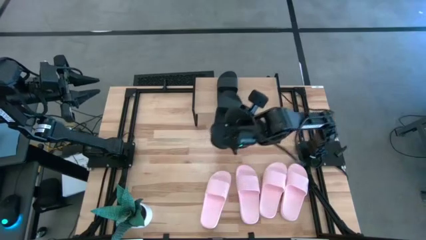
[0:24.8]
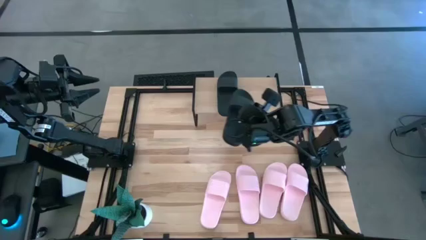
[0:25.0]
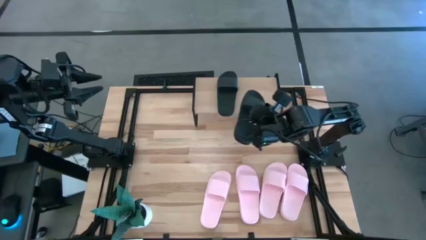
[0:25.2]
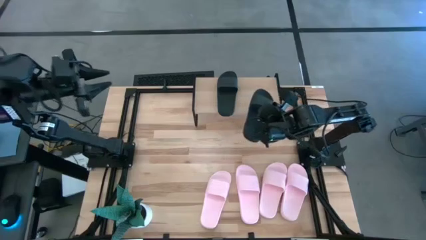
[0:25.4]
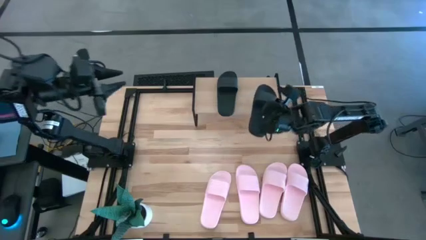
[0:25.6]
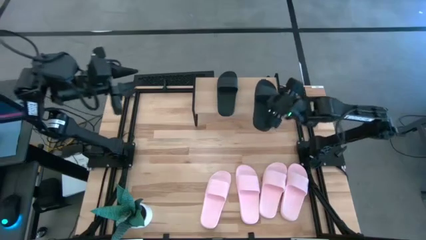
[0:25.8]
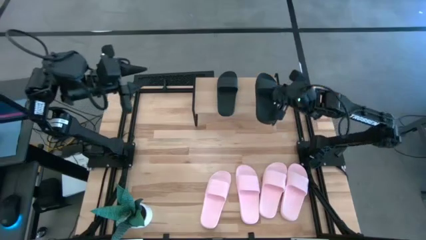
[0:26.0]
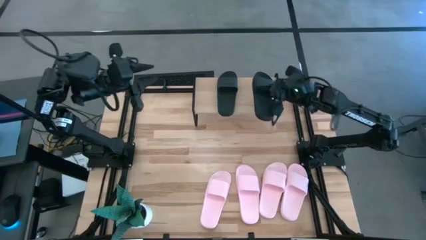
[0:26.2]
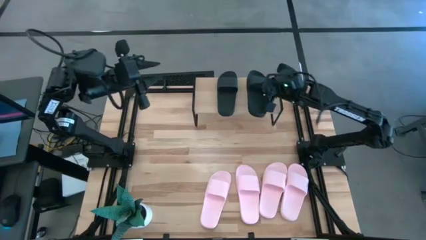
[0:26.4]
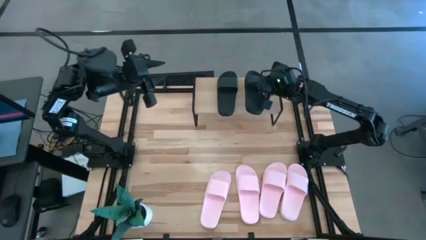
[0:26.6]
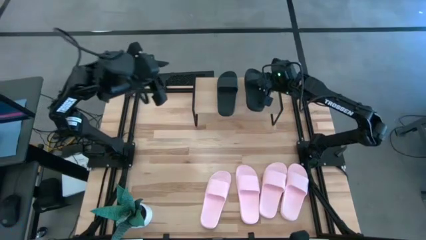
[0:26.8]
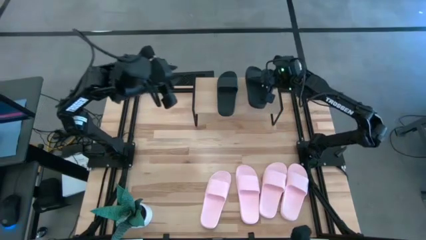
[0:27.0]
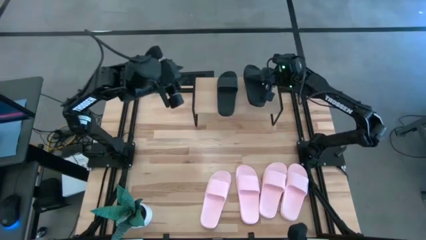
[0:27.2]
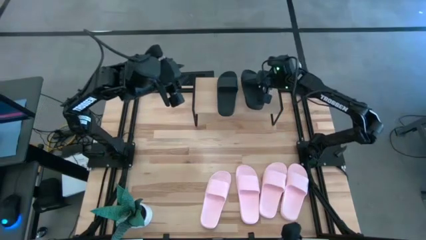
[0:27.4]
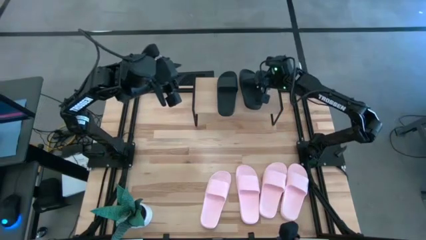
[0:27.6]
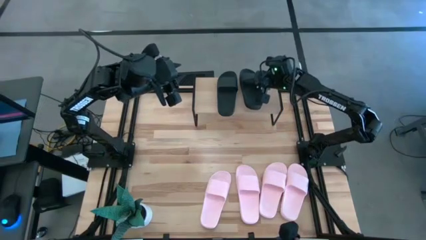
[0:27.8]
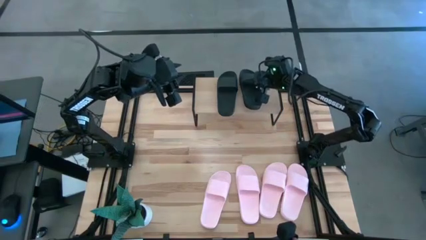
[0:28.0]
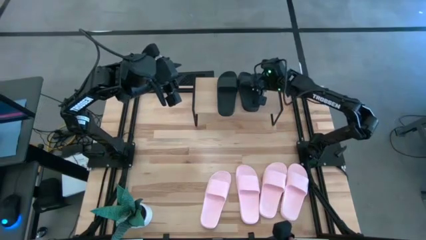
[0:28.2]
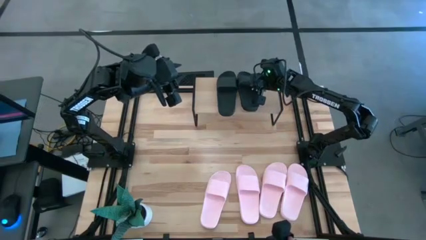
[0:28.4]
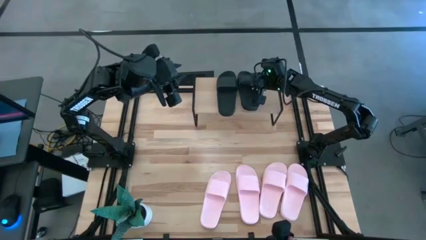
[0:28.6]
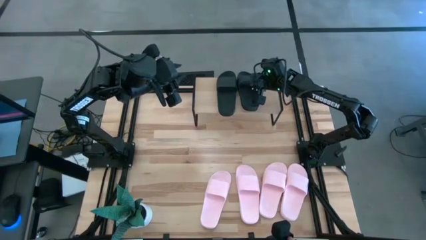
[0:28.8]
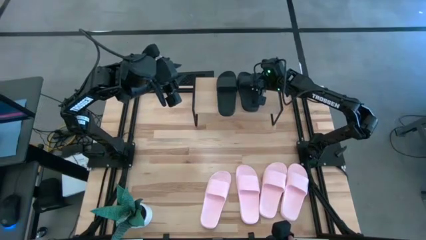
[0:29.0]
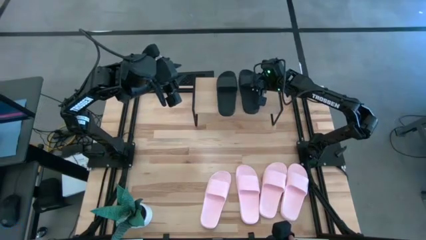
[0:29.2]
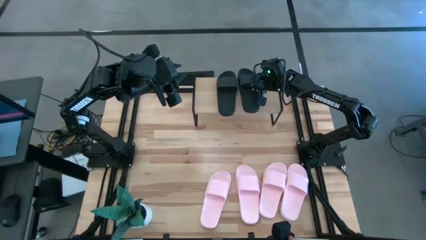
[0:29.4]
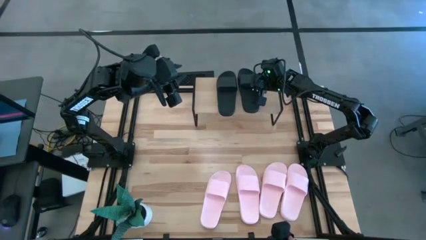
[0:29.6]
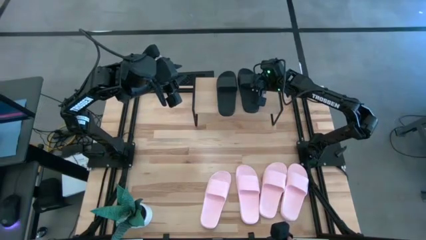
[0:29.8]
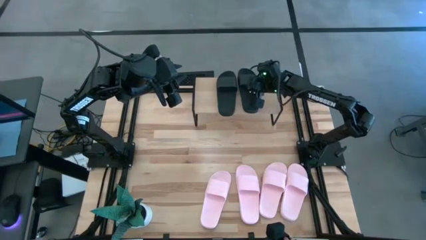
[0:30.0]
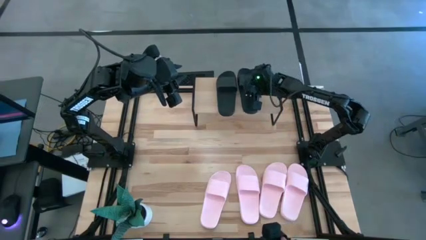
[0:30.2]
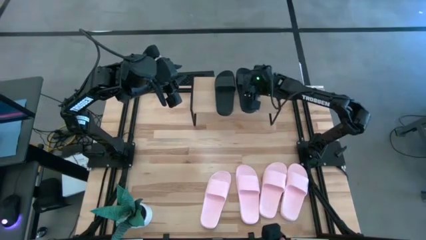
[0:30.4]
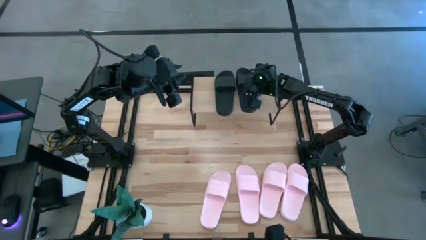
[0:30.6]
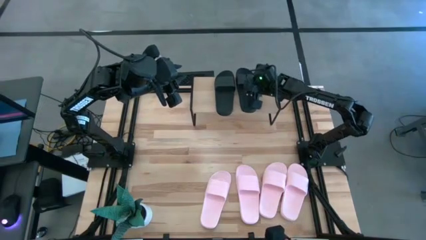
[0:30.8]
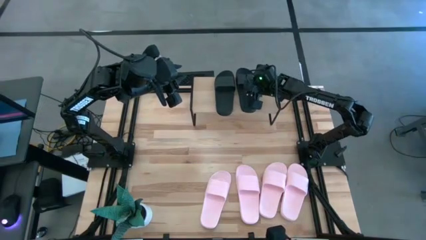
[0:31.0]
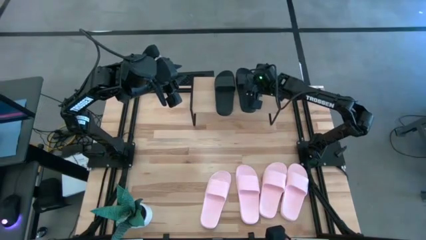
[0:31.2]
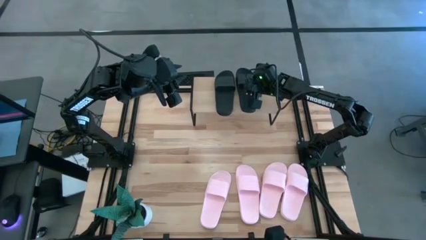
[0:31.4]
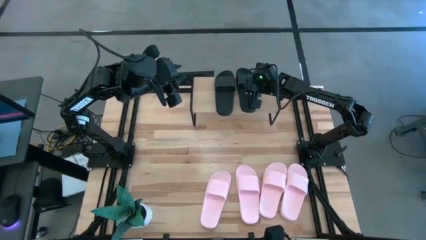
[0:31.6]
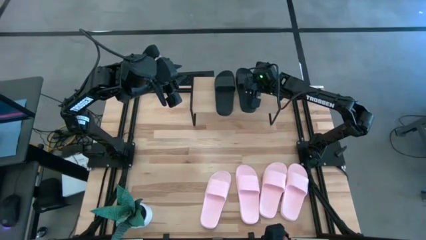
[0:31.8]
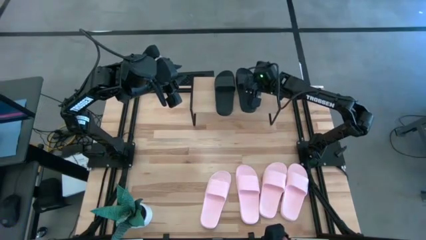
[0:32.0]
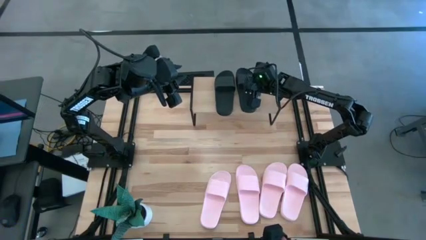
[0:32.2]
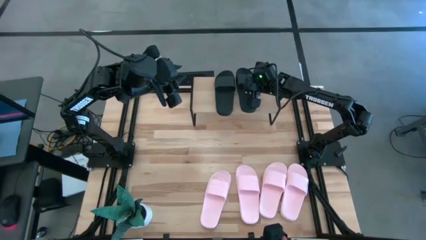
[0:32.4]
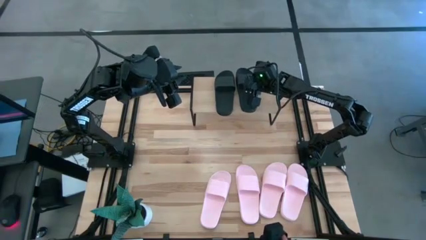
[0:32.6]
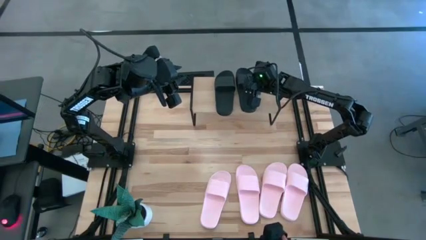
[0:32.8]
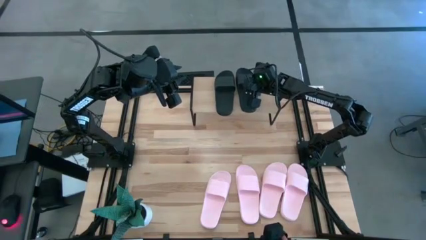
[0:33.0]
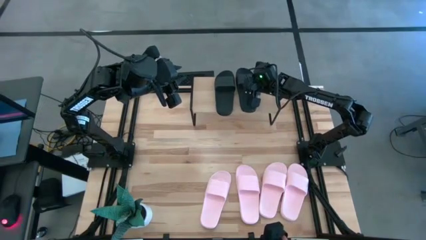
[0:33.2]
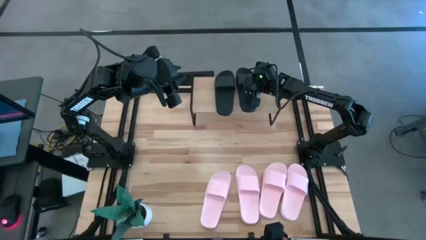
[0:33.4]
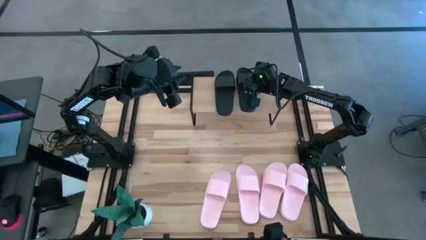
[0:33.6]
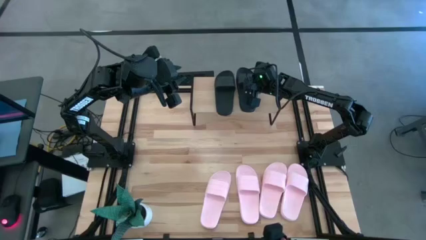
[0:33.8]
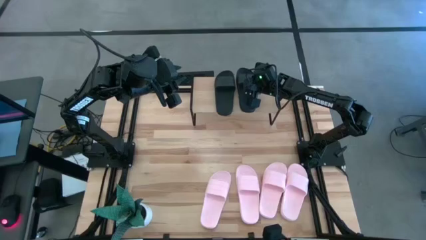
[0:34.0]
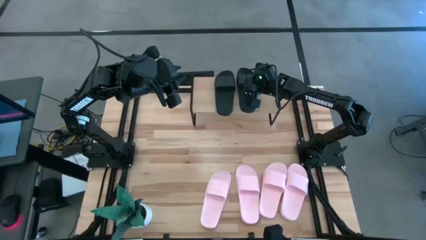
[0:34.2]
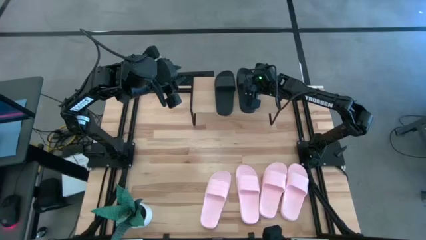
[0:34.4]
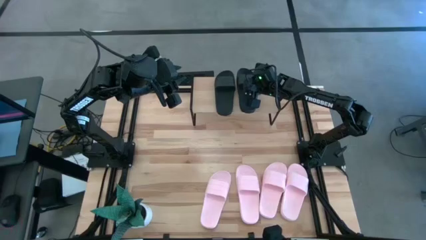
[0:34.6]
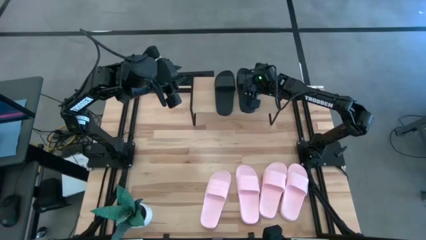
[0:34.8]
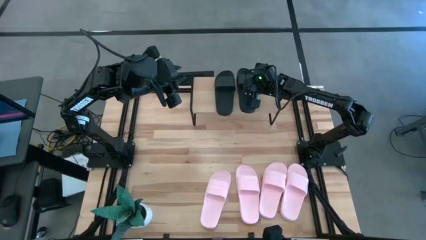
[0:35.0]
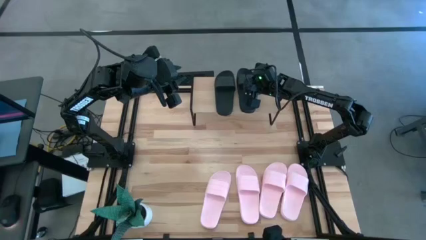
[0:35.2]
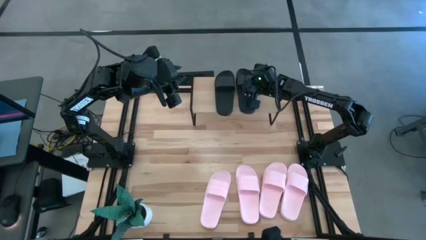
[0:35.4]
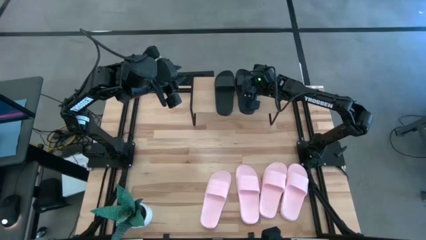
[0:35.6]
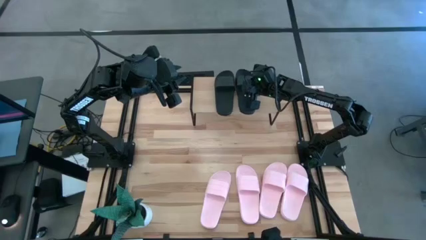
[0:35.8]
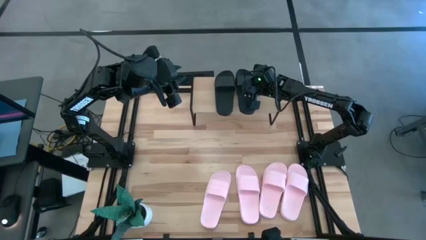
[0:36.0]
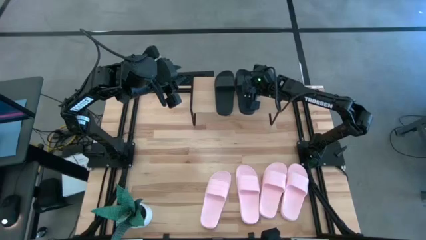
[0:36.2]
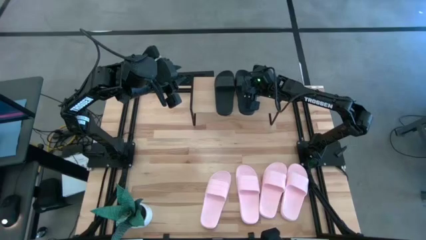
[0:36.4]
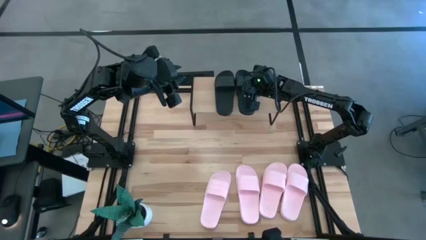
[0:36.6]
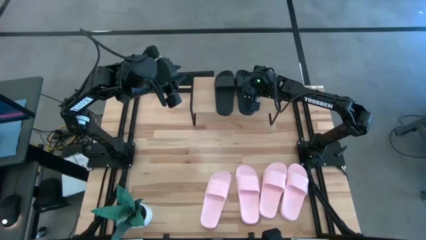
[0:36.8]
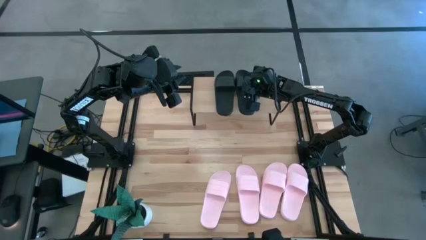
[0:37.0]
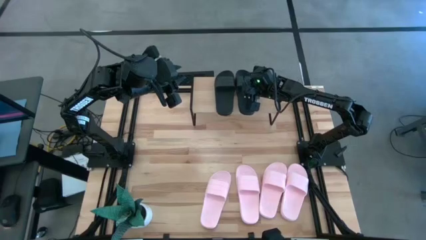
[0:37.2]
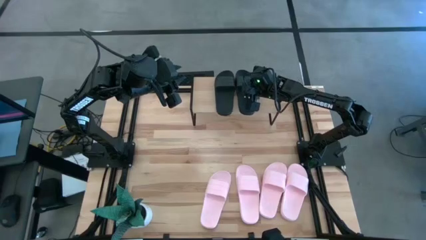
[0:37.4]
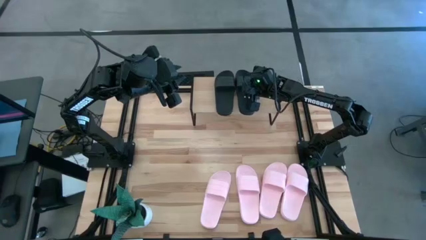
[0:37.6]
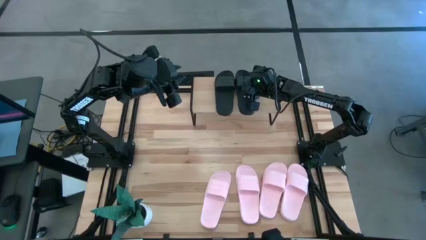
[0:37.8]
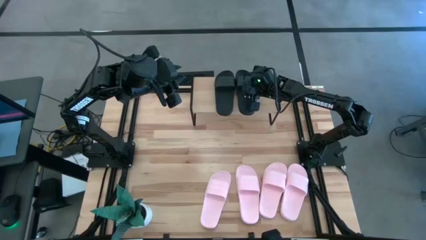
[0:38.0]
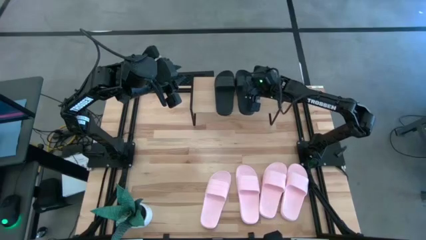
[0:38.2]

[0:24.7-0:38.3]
Task: Pick and place slides into the shelf
Put the black slipper on the shelf

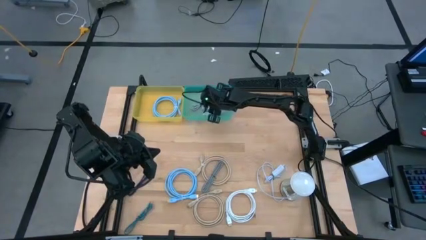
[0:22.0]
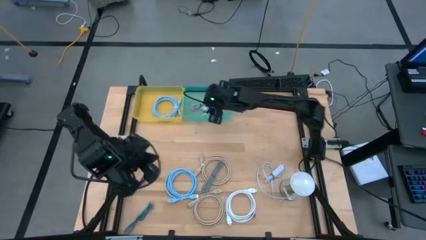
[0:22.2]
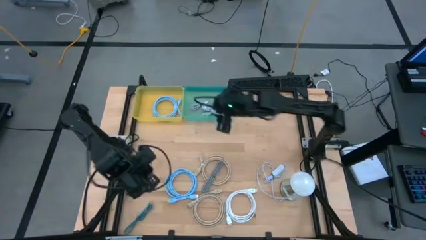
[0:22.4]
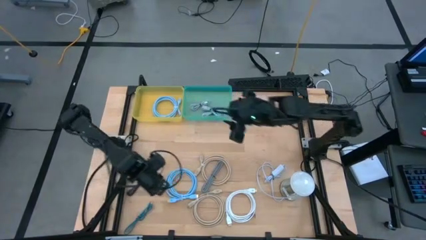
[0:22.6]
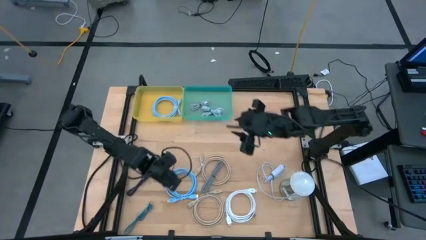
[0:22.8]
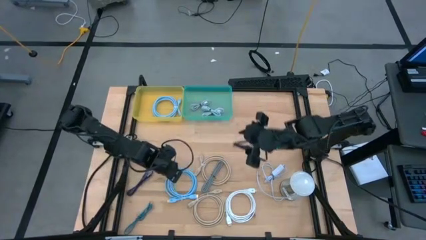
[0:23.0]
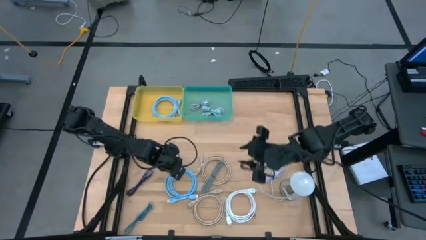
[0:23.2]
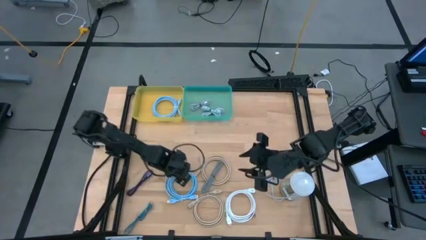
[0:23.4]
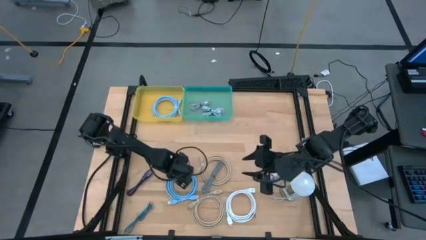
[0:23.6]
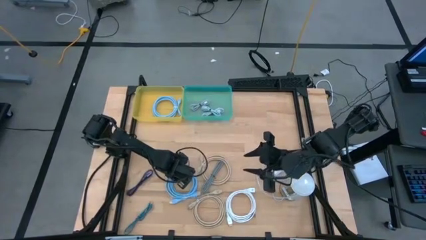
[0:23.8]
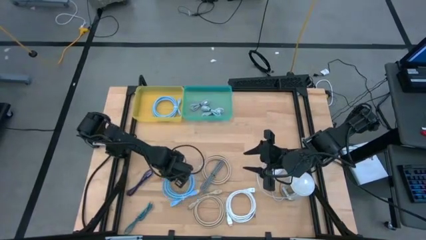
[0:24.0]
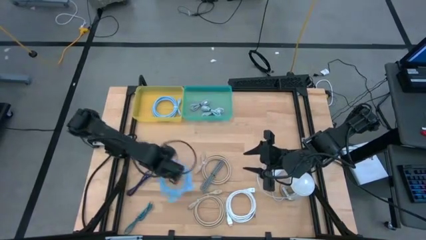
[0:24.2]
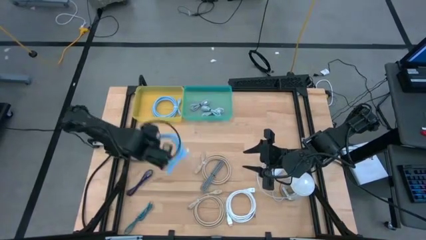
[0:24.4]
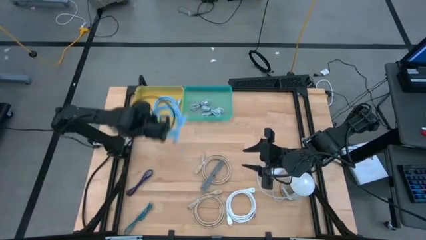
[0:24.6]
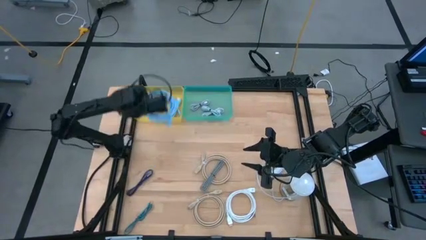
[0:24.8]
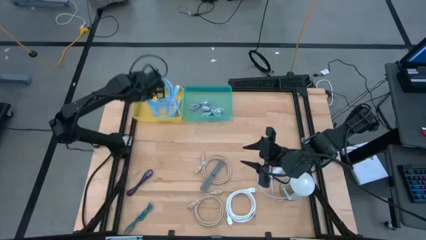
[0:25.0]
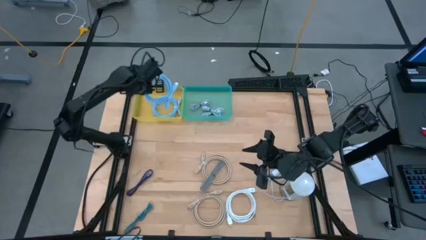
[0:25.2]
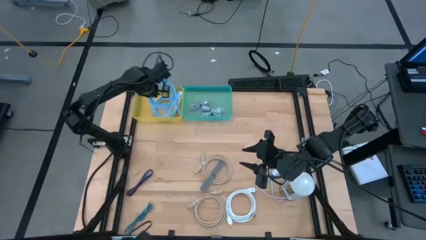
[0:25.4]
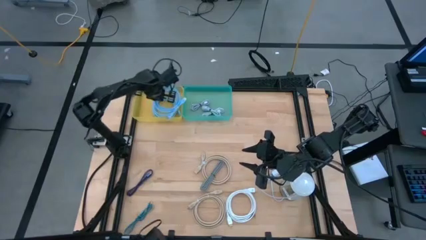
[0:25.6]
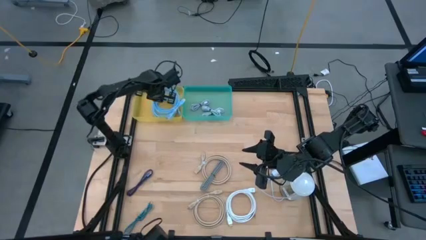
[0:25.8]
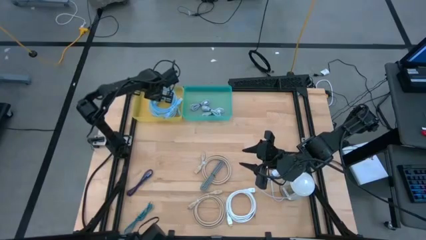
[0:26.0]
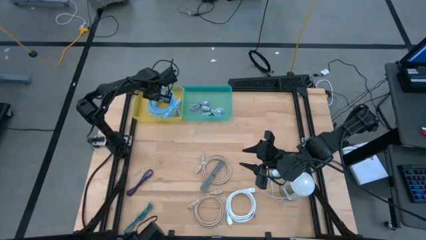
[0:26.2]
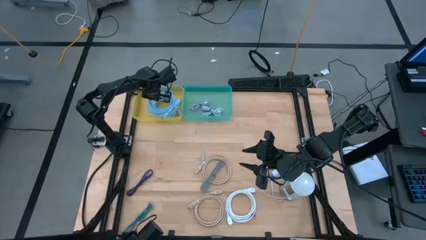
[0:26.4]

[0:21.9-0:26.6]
Task: Pick & Place USB Port
Put the blue HDMI cable into the yellow bin
